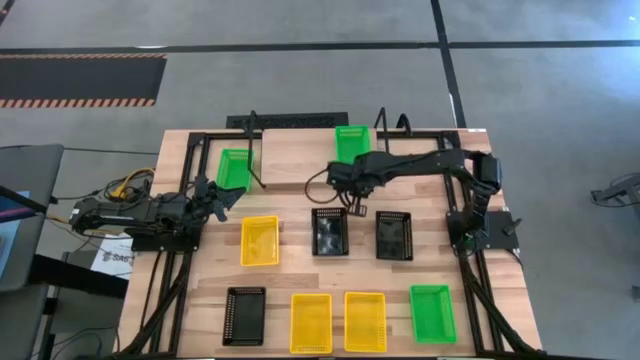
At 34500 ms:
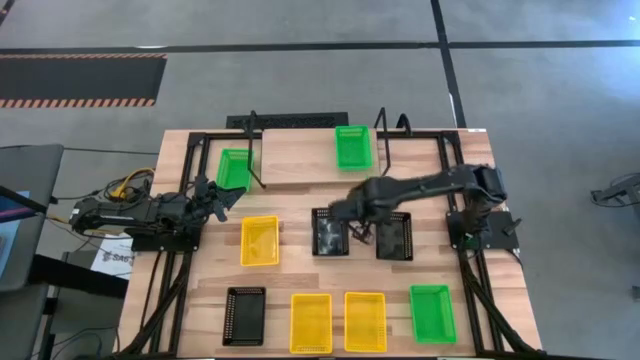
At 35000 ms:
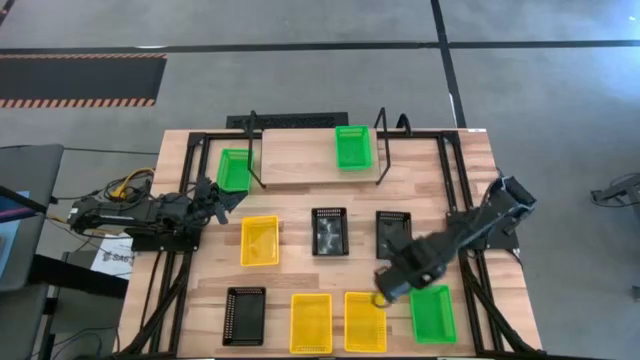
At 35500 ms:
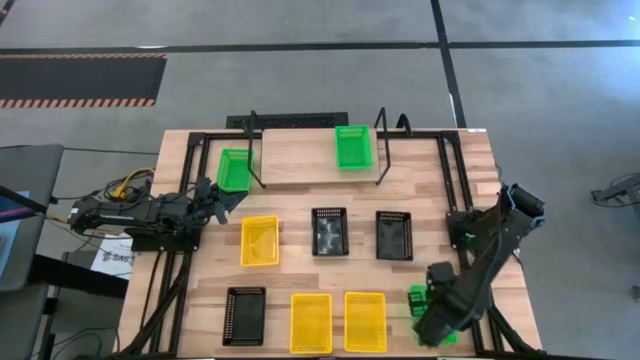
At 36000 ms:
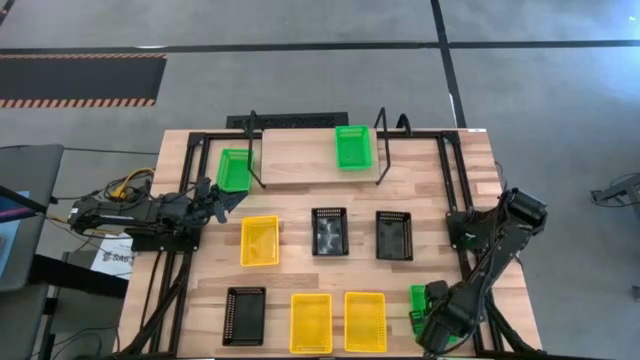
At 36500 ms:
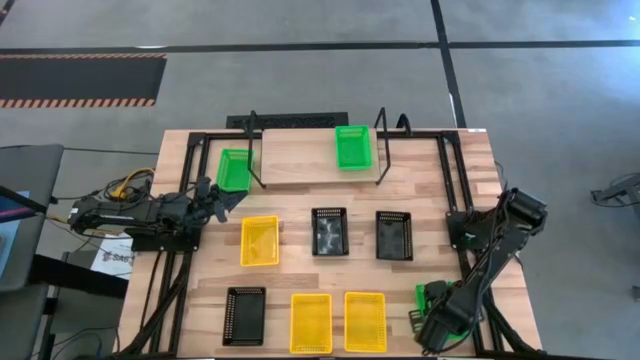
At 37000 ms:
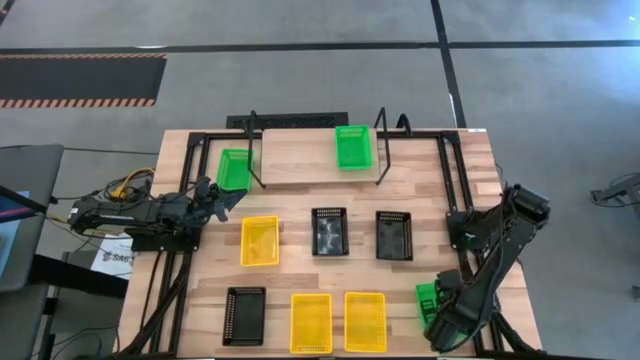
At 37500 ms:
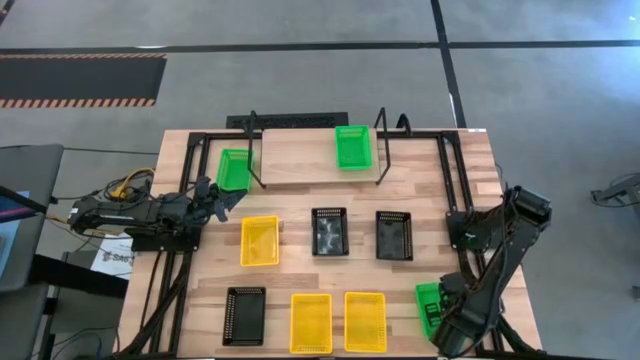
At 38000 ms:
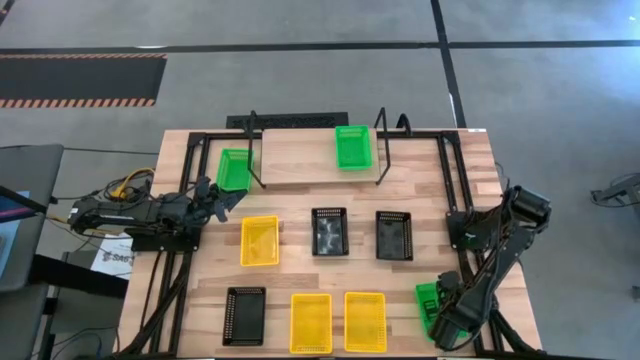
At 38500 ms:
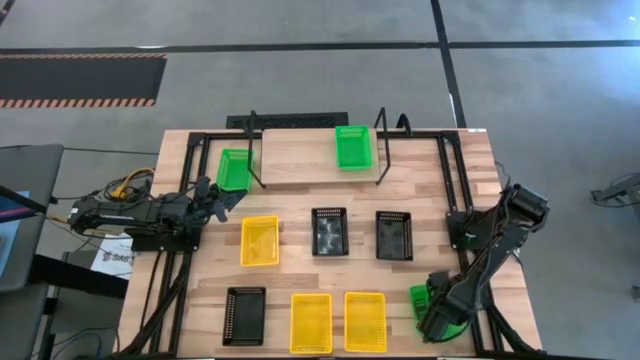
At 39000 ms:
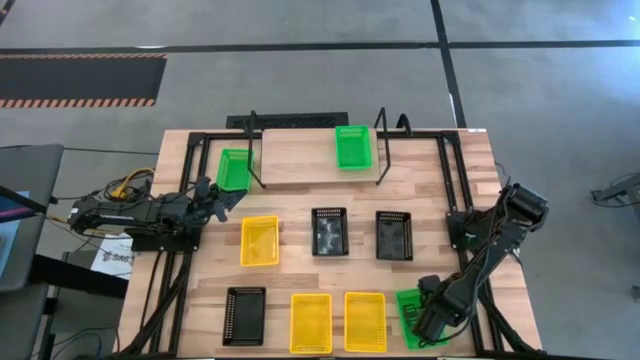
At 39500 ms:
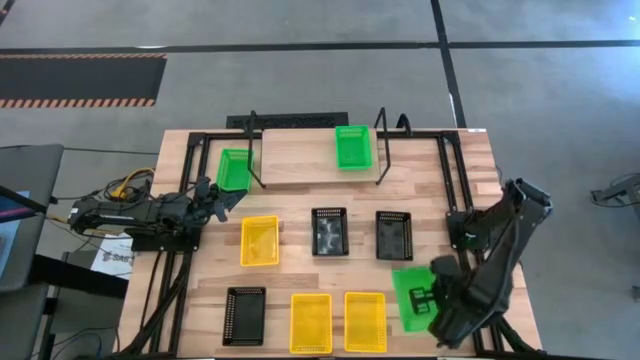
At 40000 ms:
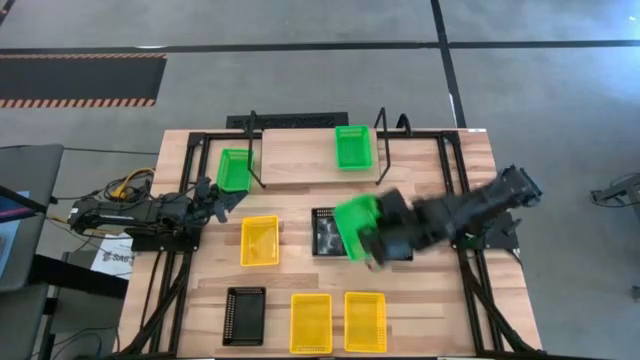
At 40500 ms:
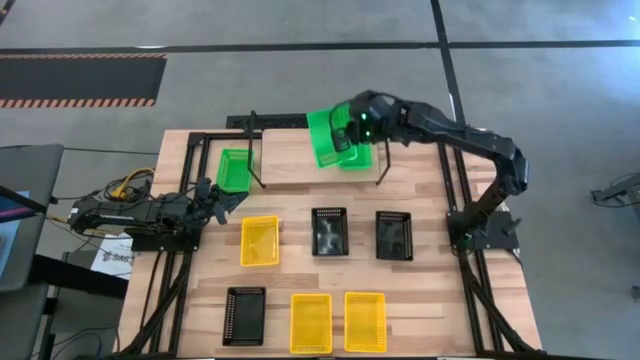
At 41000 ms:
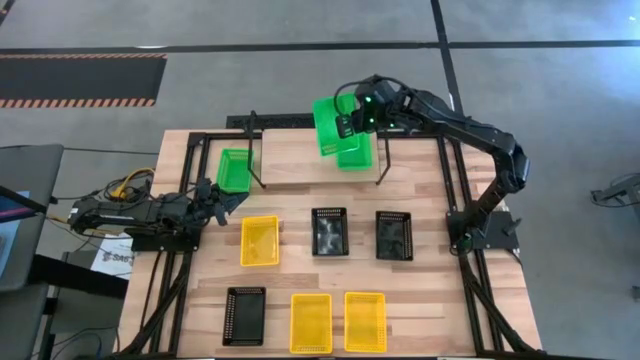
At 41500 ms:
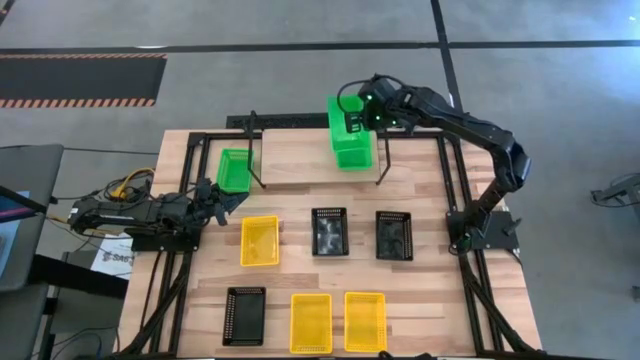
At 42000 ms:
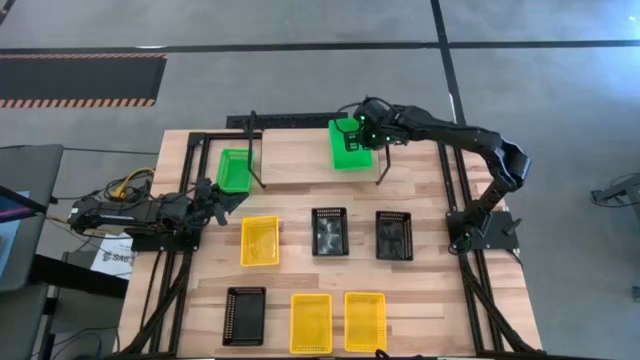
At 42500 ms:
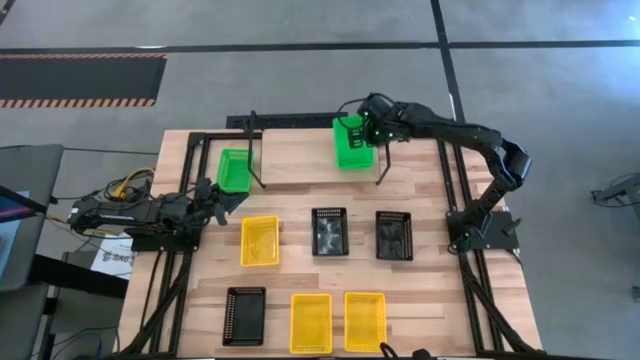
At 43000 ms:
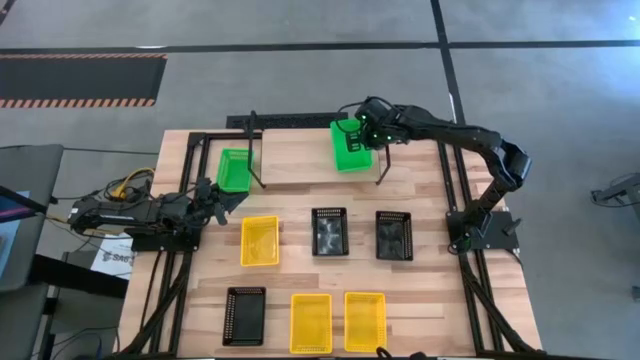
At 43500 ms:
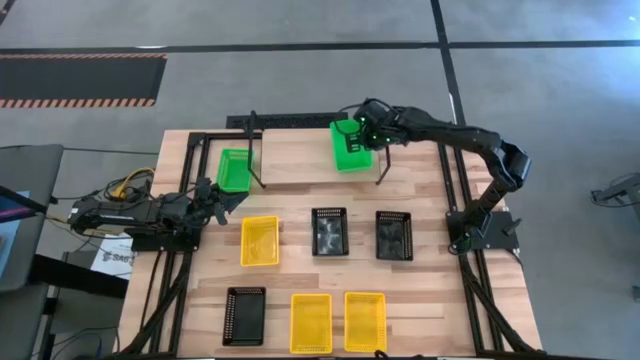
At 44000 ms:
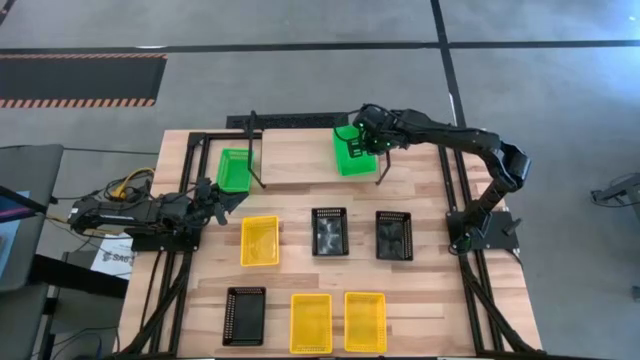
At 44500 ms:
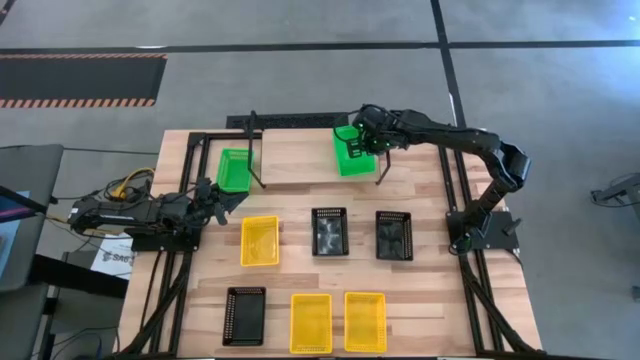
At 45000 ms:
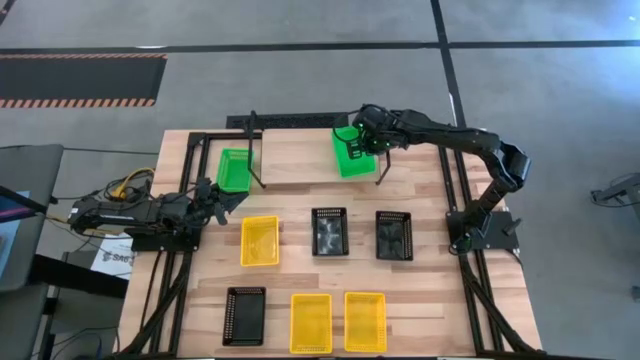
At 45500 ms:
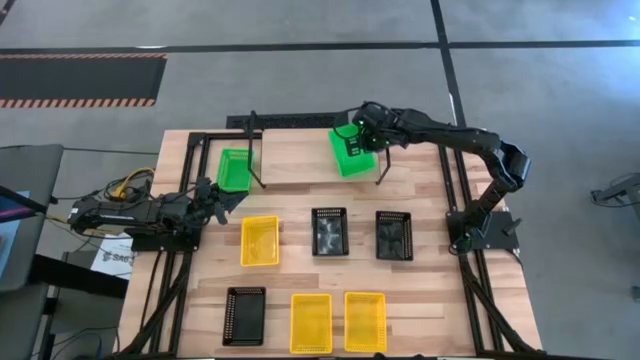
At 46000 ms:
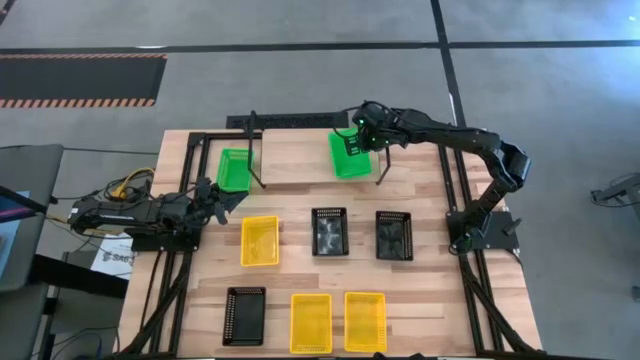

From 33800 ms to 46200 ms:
Task: Stack baskets on shelf by color
Stack the bottom green bin on the green bin on the shelf

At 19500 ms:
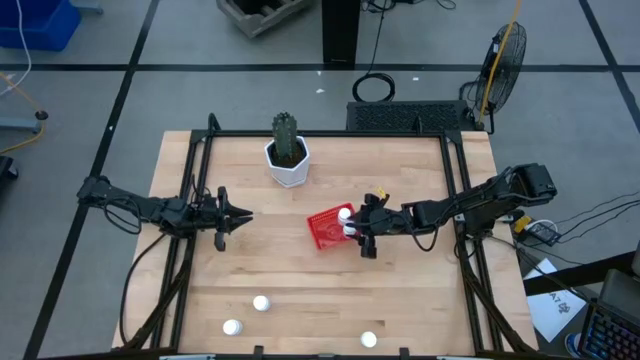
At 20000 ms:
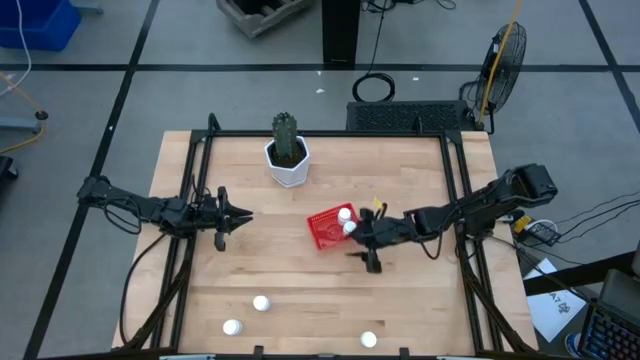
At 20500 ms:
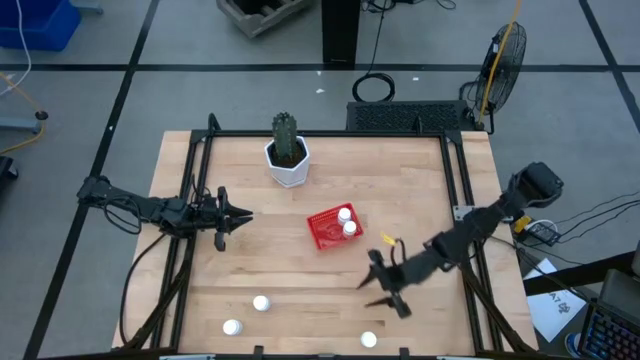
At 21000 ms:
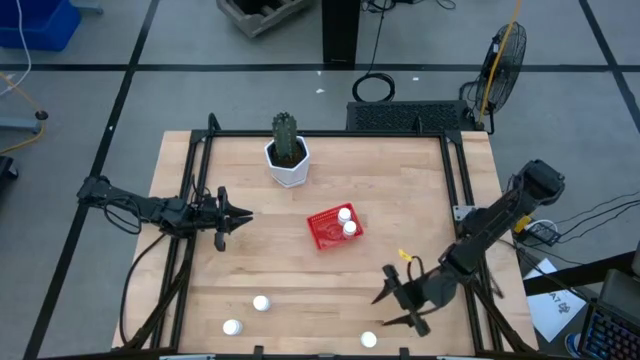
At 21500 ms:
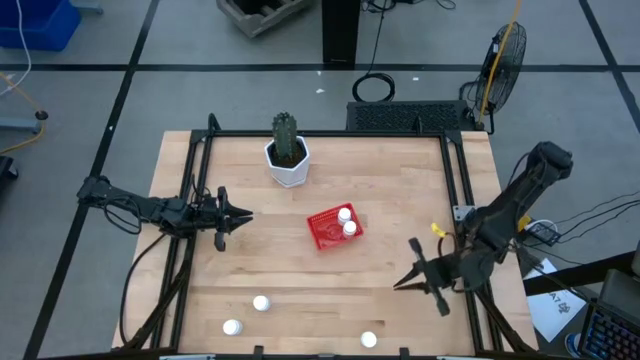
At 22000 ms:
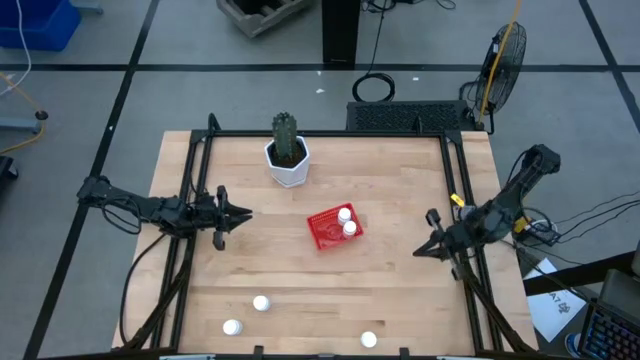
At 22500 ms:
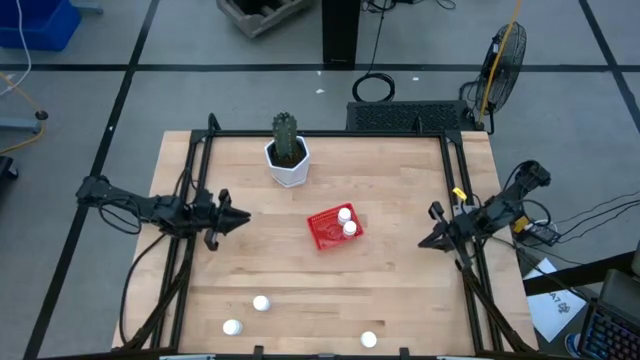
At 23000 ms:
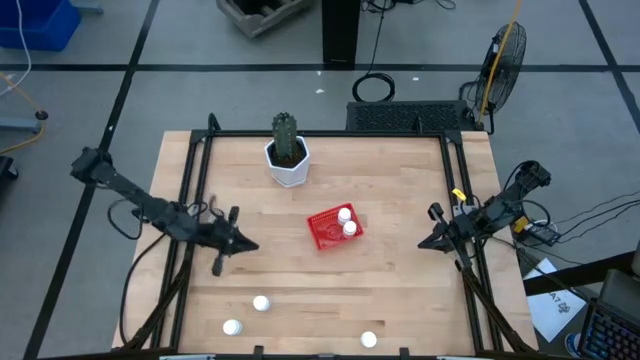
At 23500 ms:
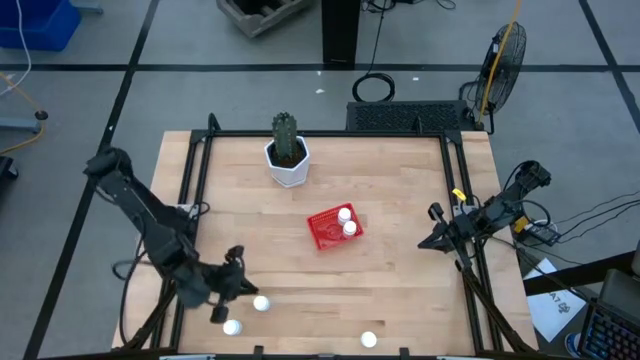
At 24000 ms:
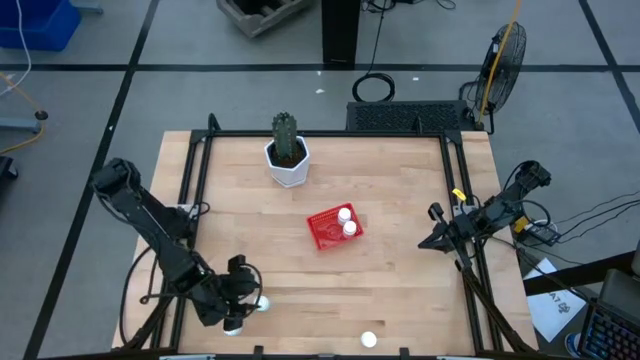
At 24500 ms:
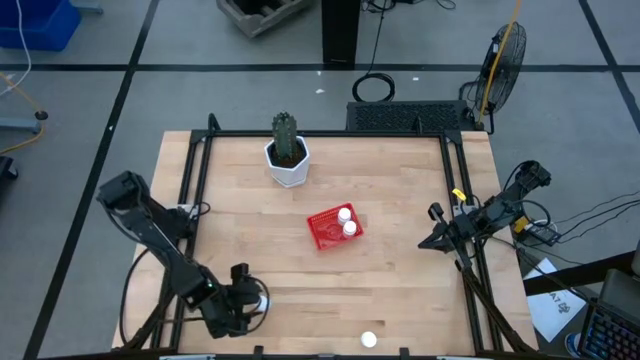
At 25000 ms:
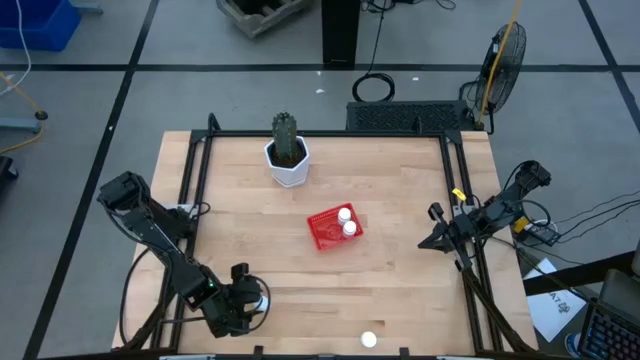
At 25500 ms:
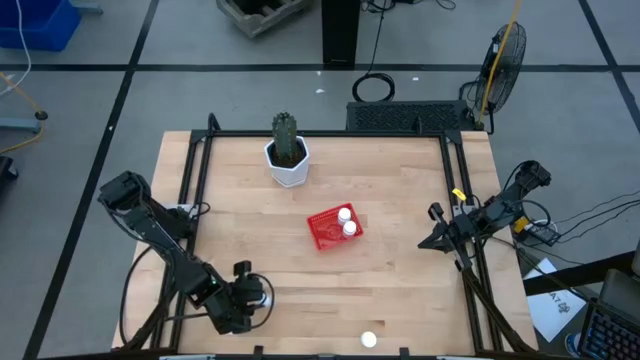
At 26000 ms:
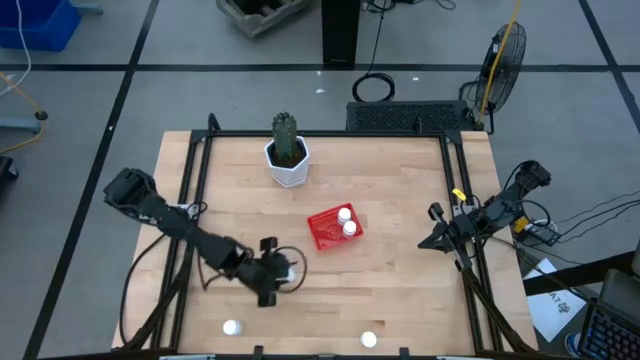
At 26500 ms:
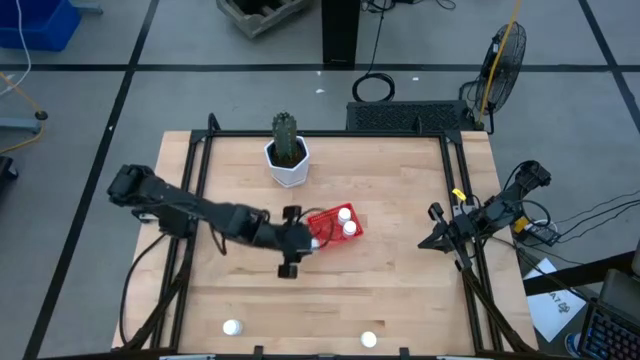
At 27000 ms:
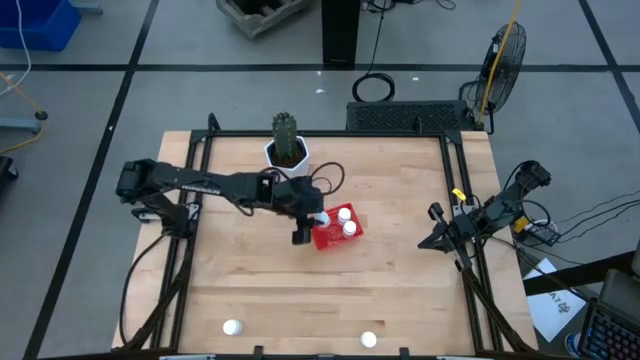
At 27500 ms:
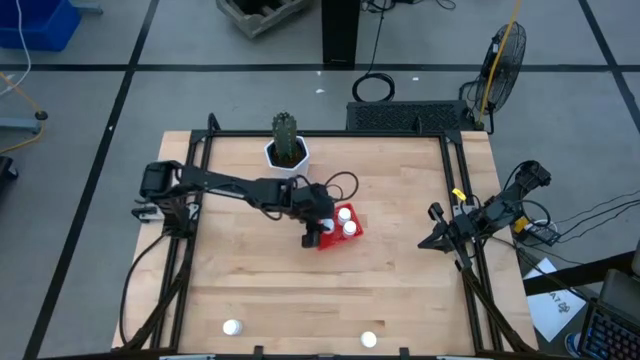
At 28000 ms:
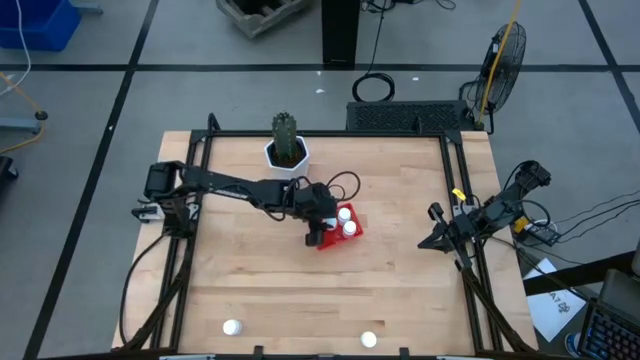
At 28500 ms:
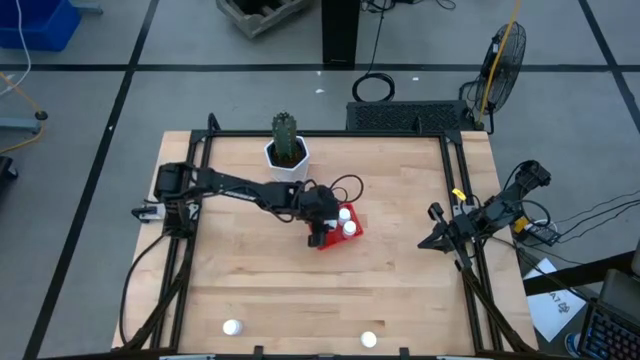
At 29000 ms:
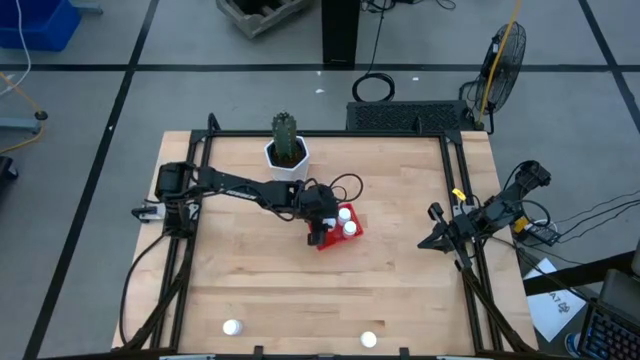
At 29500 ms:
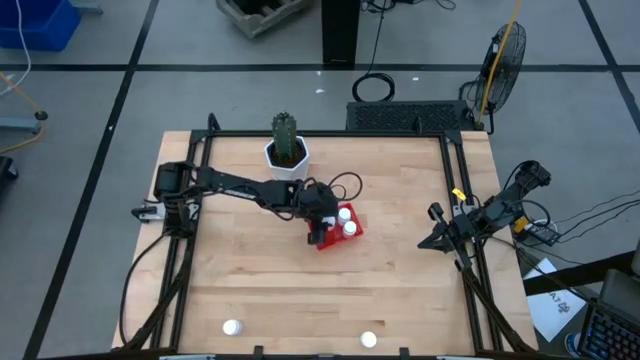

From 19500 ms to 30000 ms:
Task: Pick and place pill bottles into a basket
Put the white medicine bottle into the red bin
